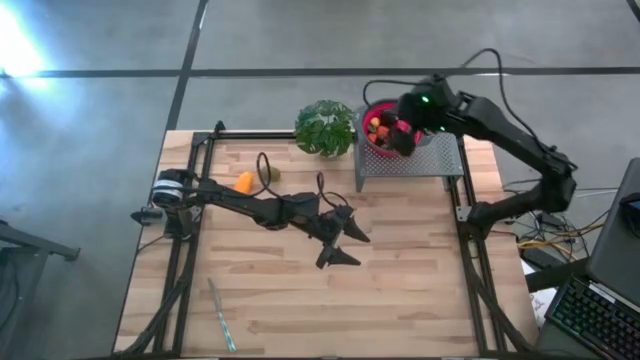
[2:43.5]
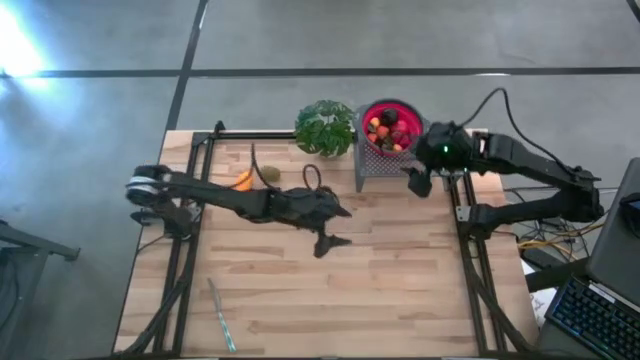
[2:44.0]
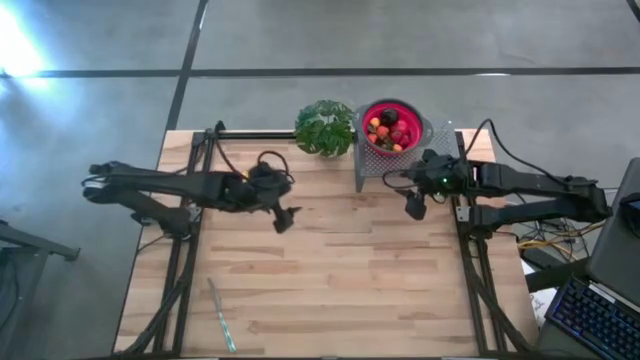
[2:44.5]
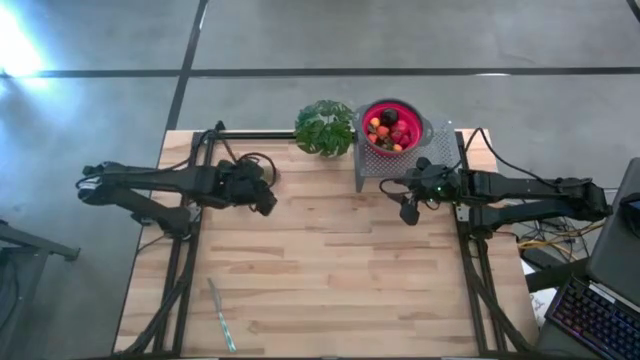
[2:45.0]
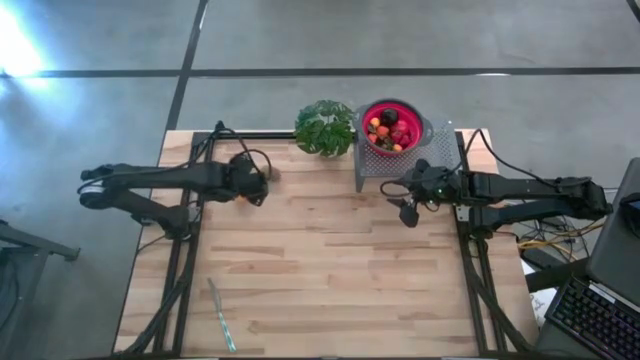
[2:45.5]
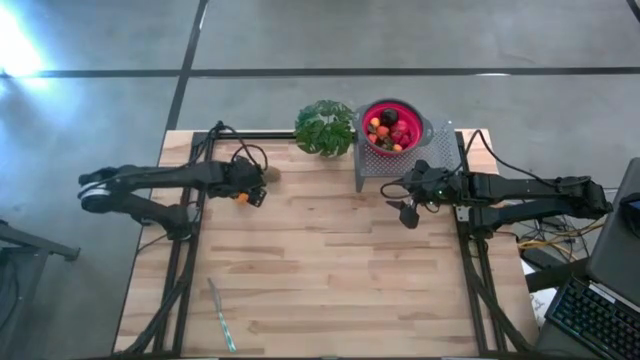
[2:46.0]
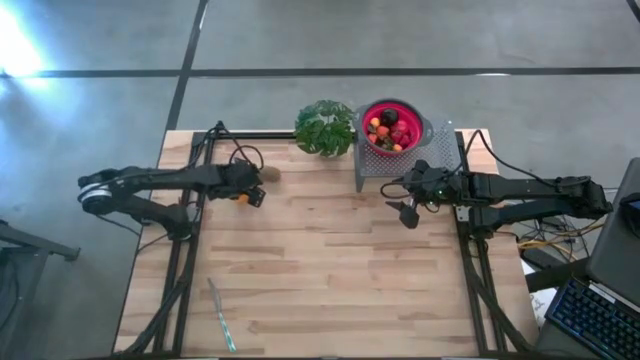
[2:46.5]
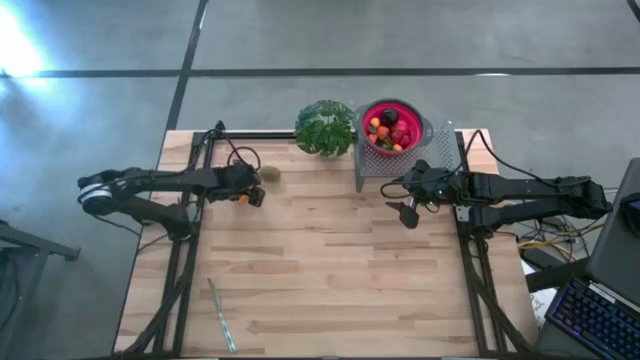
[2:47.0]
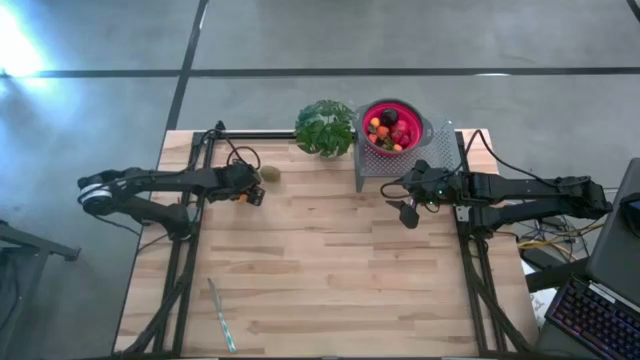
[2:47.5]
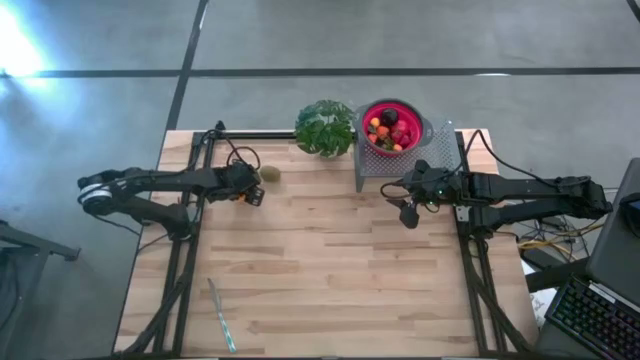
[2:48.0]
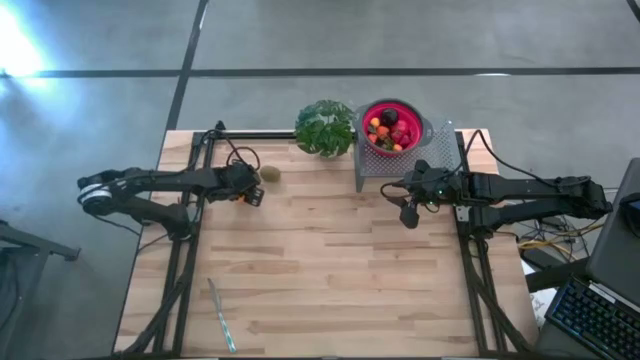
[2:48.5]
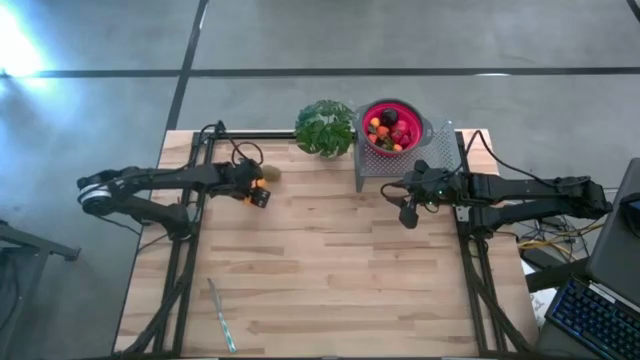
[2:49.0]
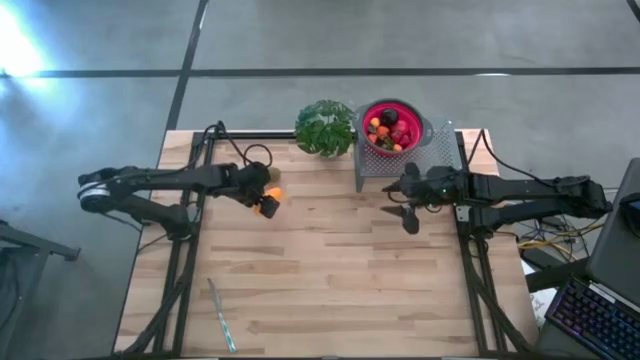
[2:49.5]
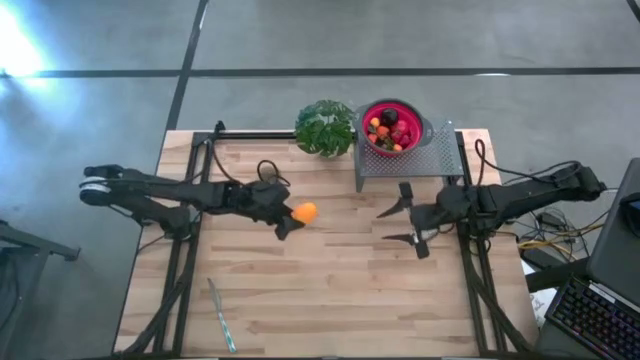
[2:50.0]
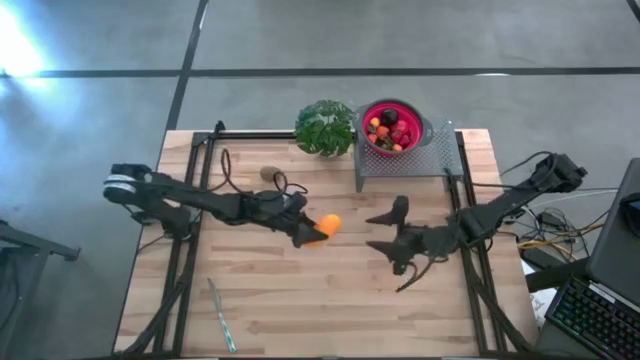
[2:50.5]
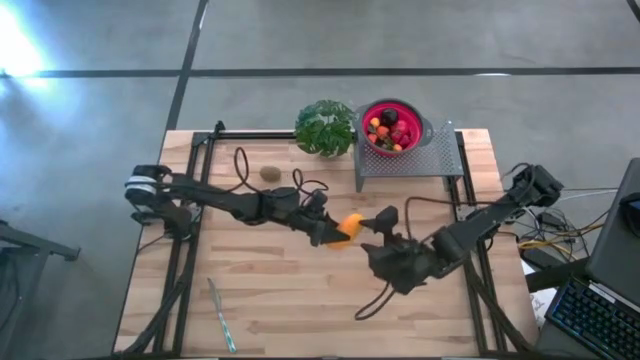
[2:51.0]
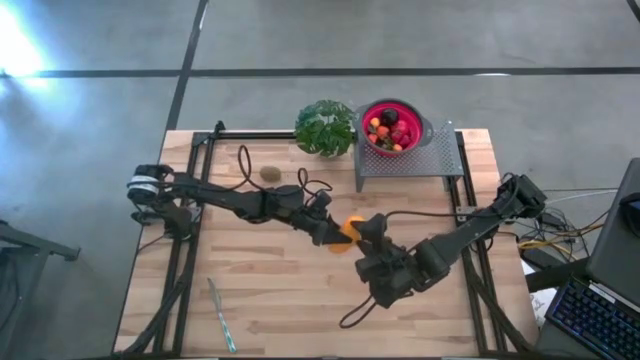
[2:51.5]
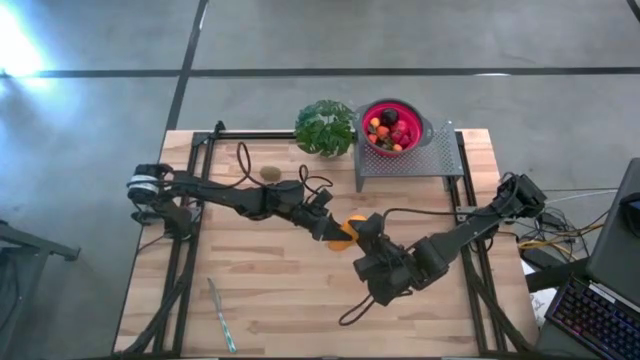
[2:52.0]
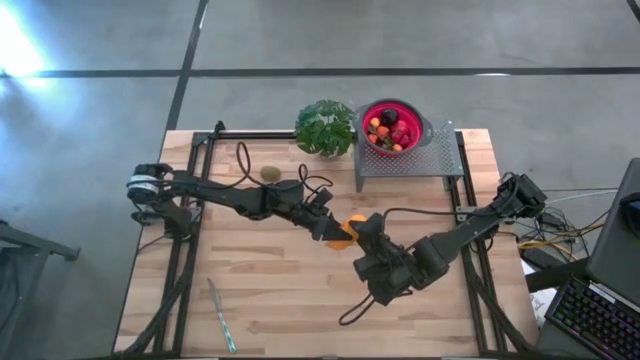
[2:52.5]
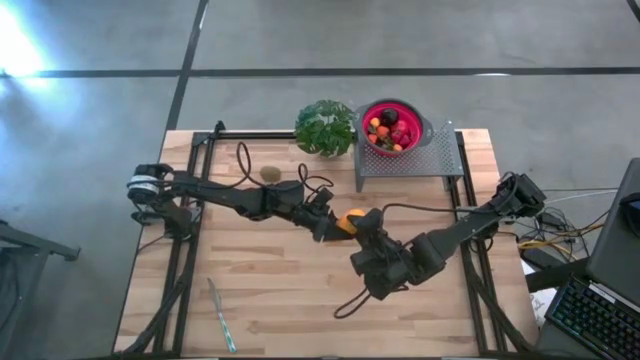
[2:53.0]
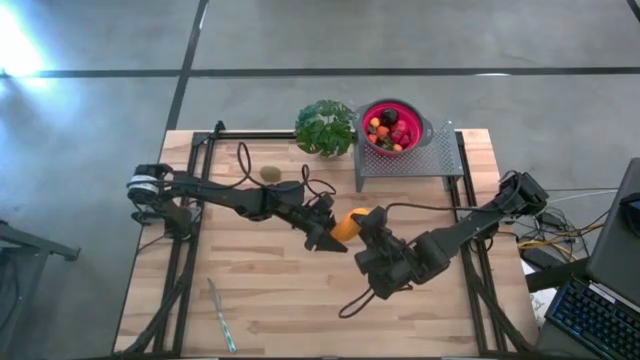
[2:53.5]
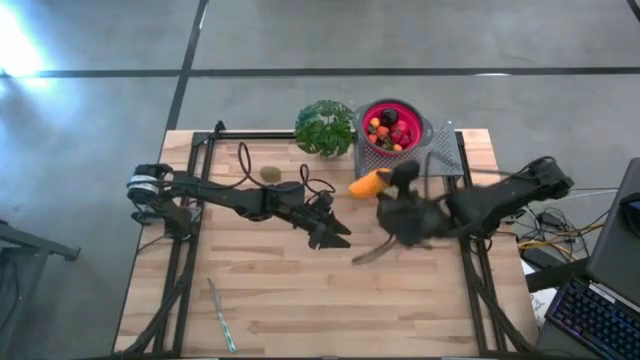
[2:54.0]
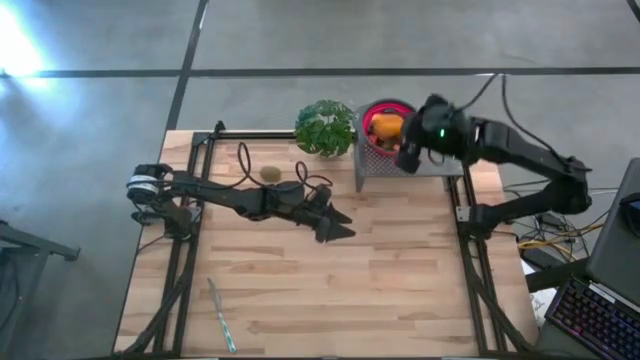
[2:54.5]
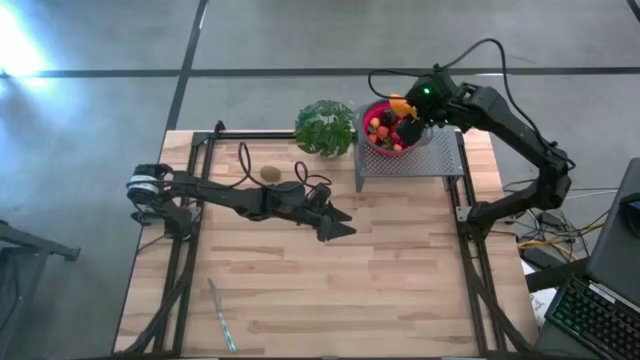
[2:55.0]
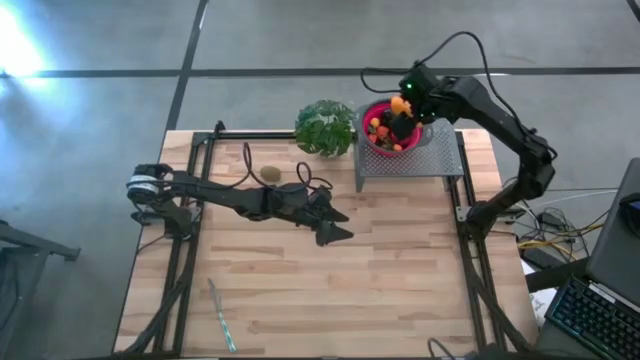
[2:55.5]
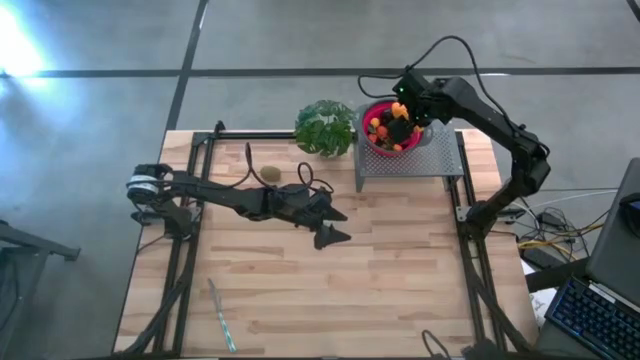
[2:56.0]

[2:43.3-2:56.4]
Task: Pick & Place Fruit
Put the mango into the red strainer bowl on the shelf

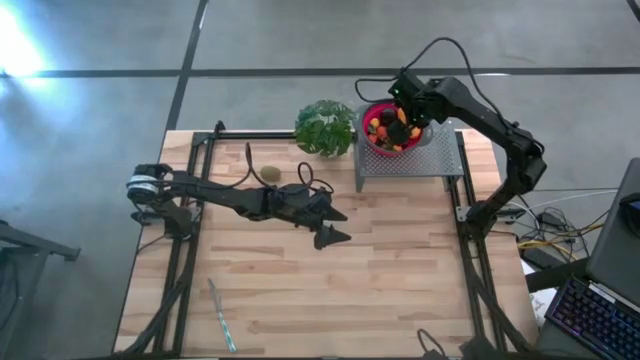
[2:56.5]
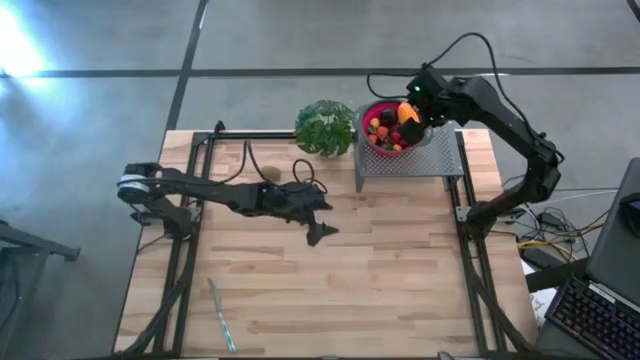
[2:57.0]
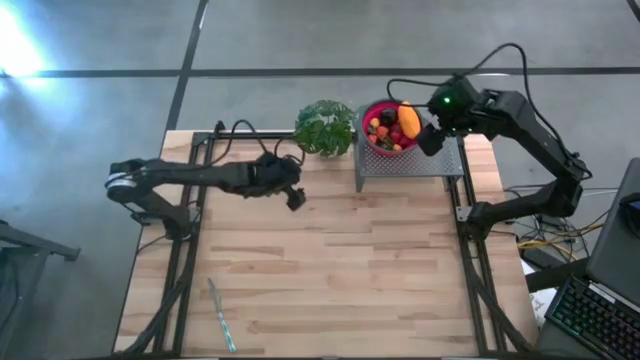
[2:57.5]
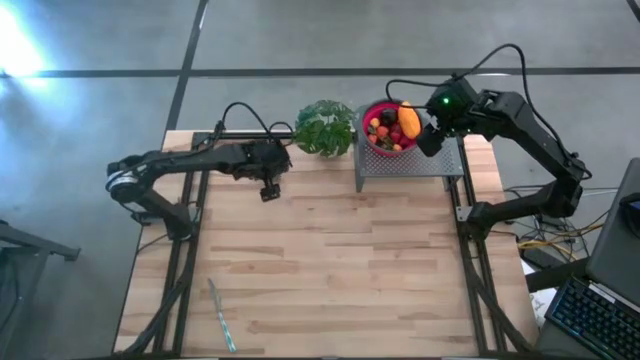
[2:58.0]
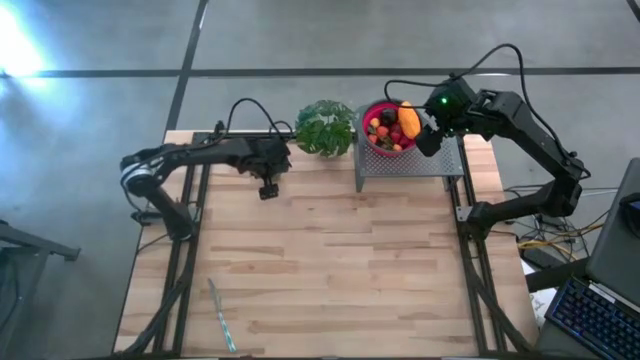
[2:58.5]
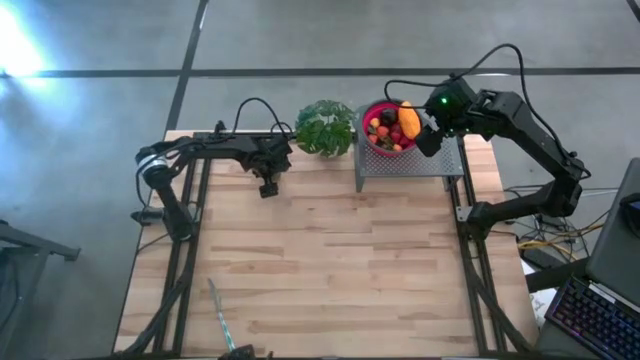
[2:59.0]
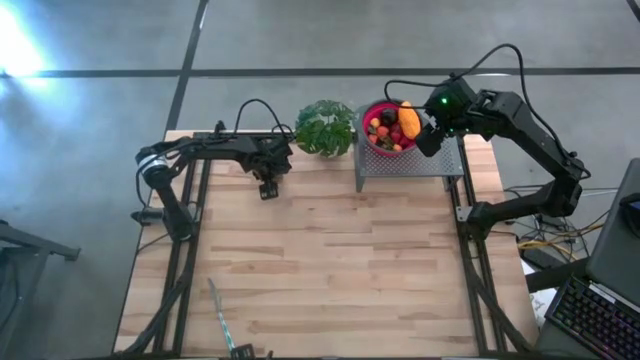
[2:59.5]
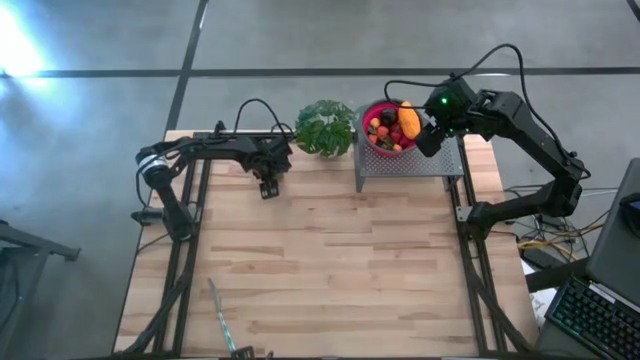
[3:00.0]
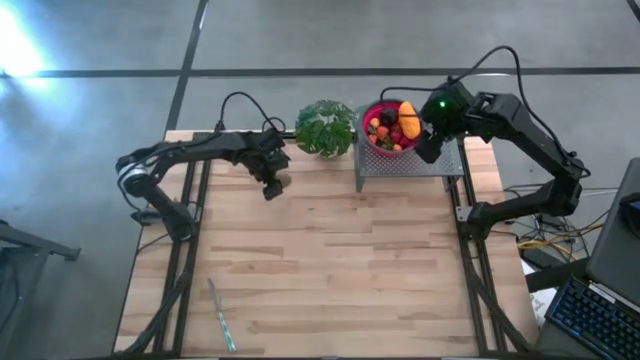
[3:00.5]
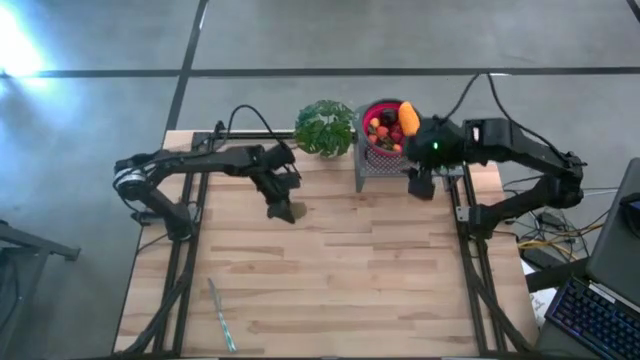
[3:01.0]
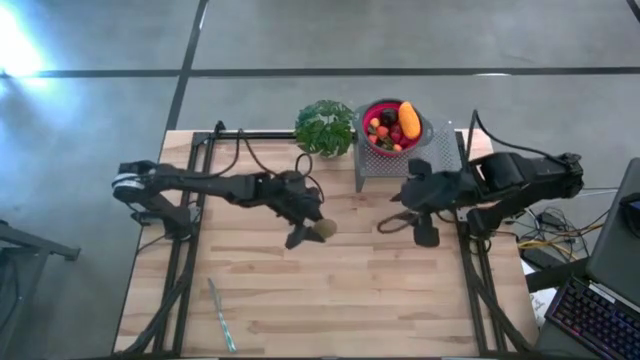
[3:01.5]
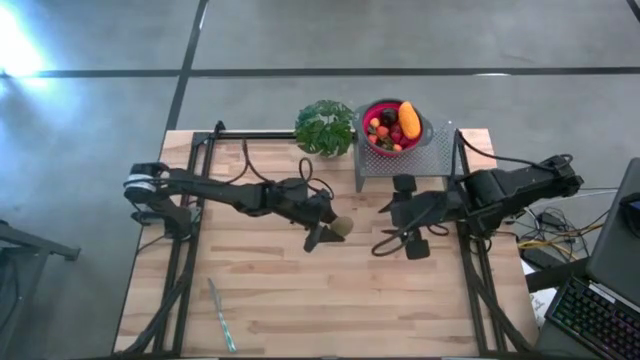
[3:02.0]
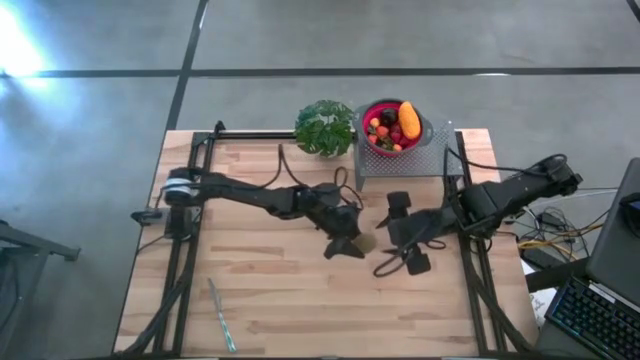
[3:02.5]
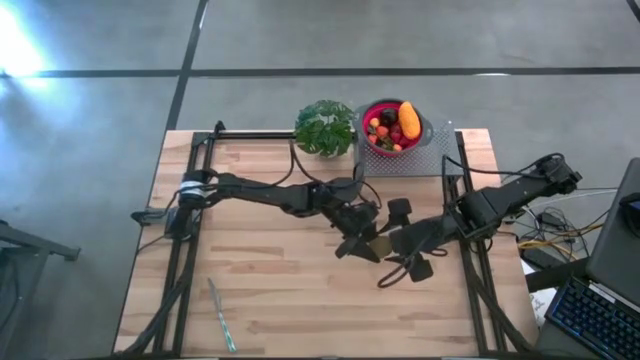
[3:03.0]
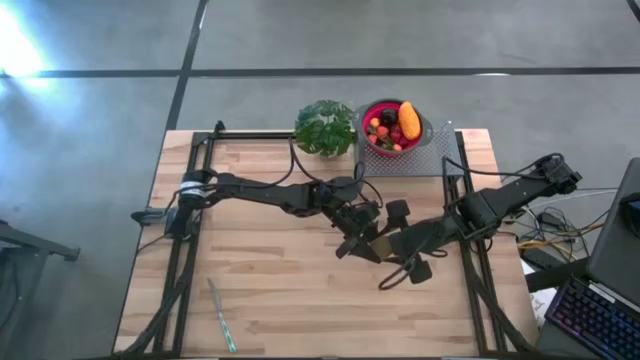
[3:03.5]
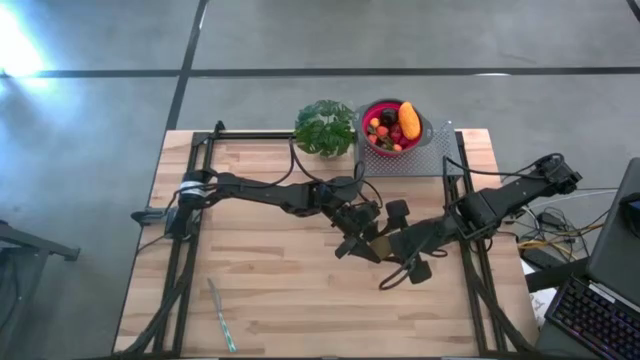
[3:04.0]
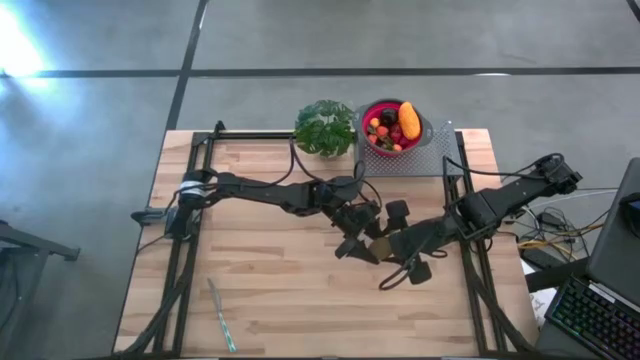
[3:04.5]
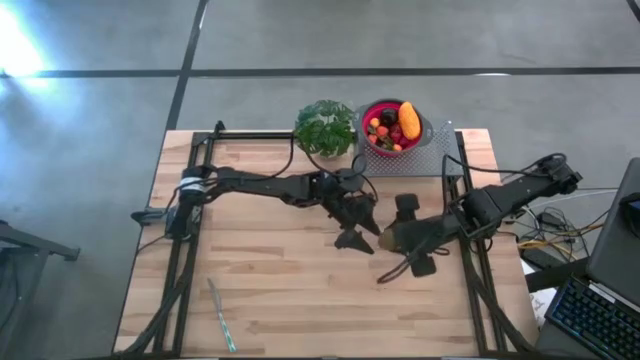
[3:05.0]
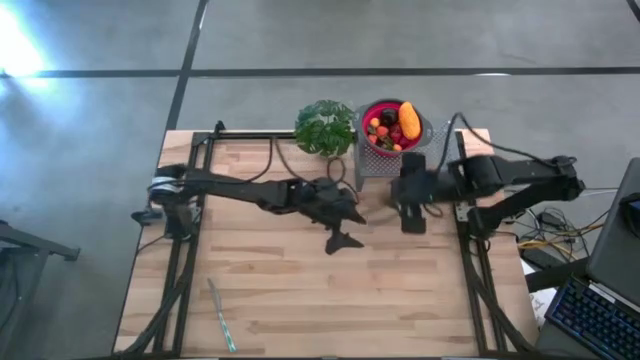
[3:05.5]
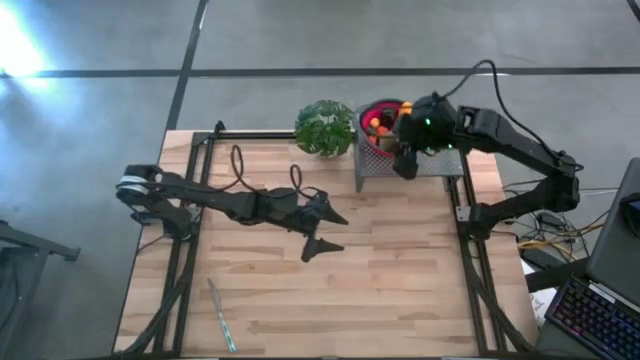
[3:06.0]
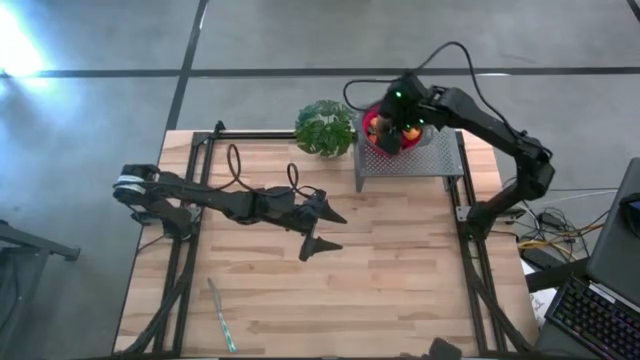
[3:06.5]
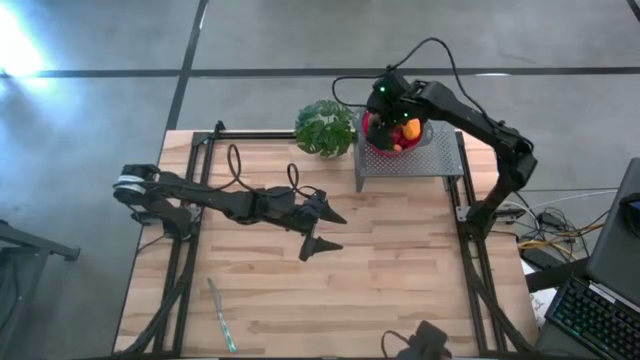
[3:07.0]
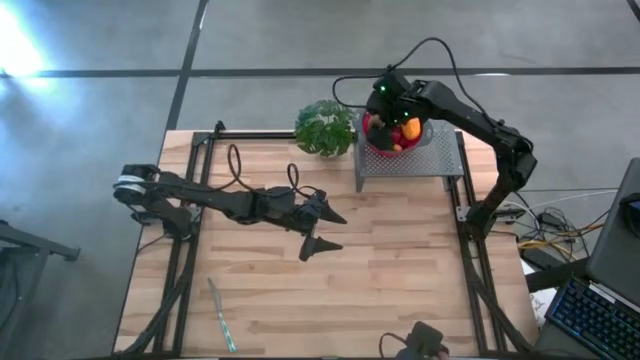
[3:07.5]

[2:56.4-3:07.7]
Put the kiwi into the red strainer bowl on the shelf
